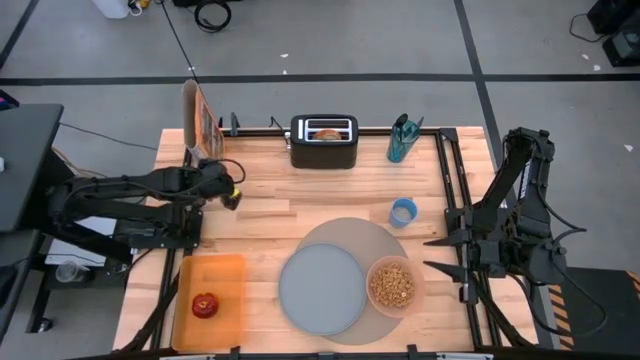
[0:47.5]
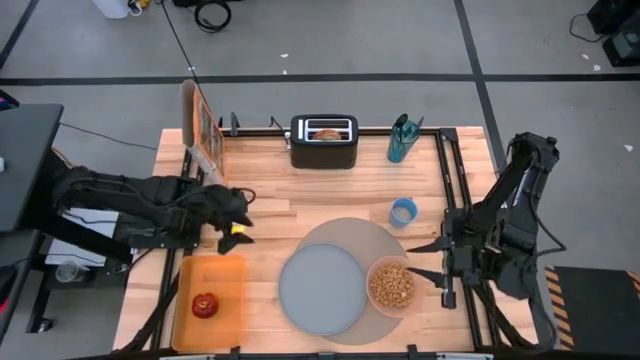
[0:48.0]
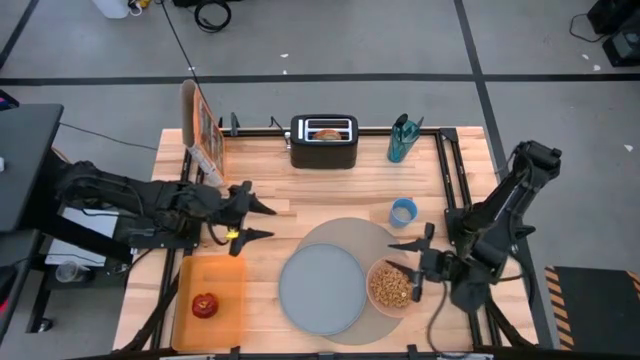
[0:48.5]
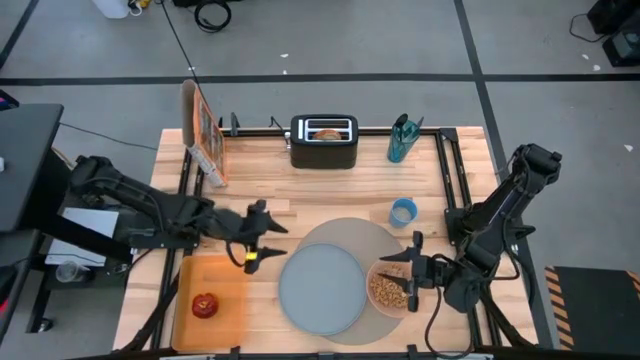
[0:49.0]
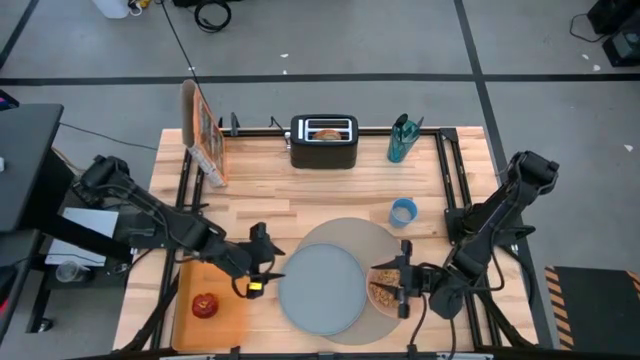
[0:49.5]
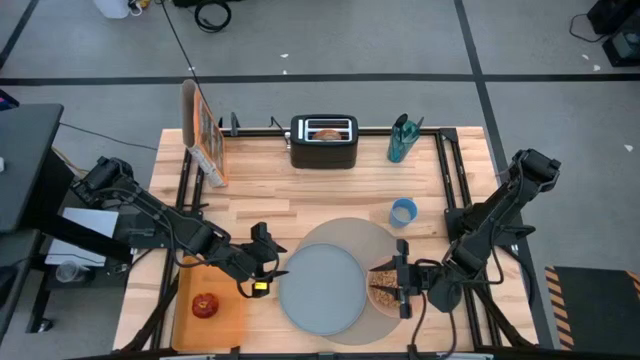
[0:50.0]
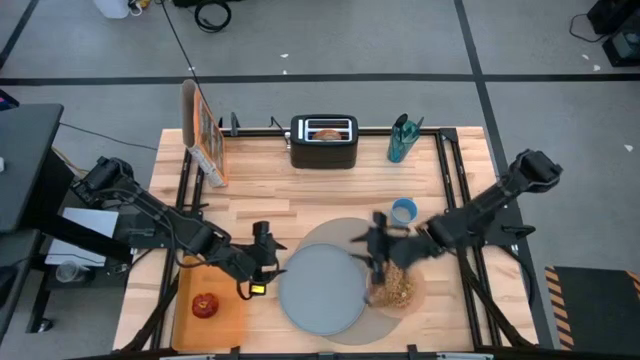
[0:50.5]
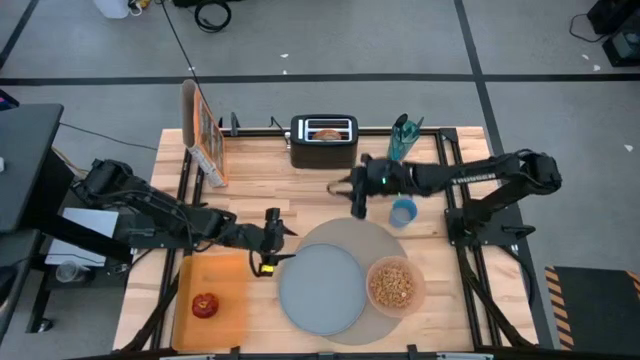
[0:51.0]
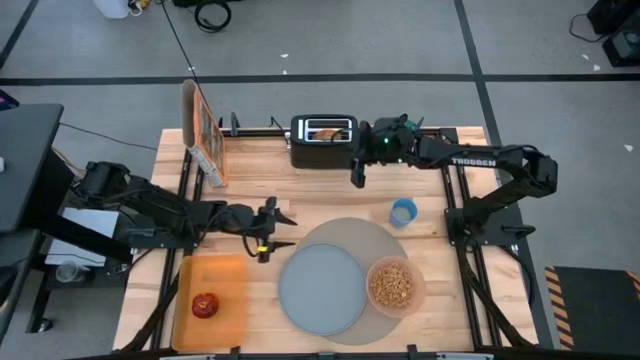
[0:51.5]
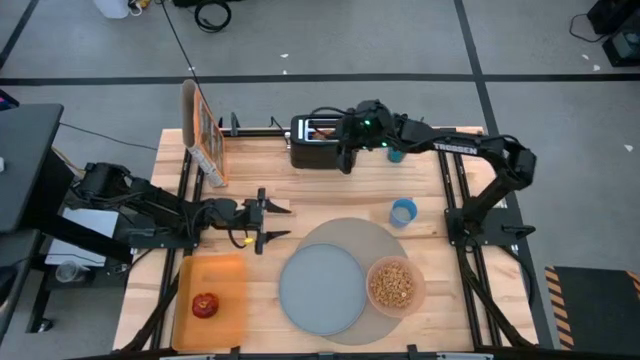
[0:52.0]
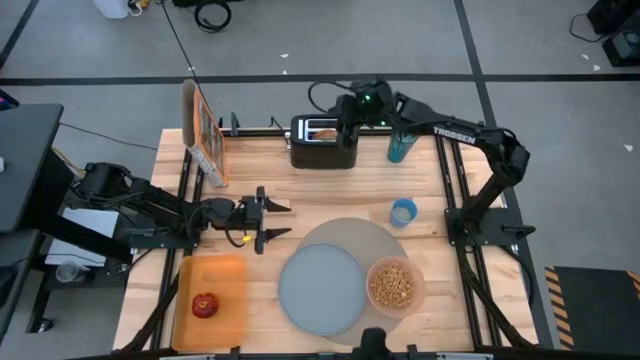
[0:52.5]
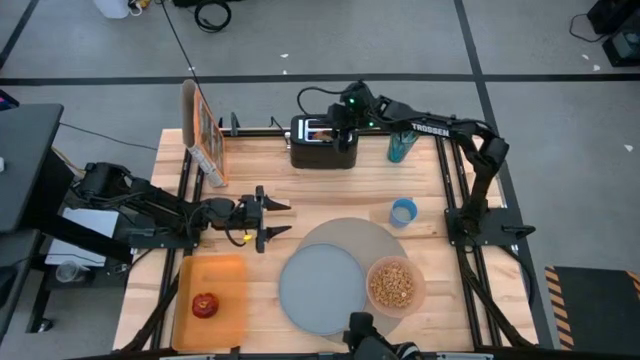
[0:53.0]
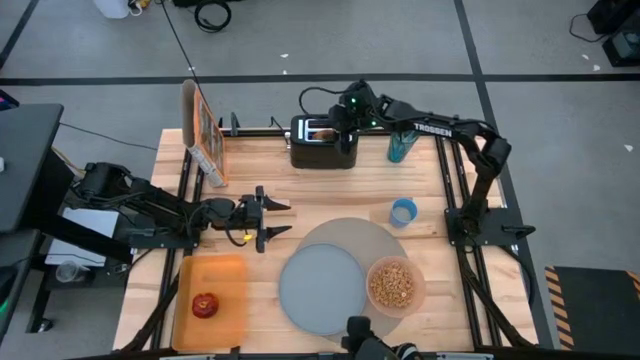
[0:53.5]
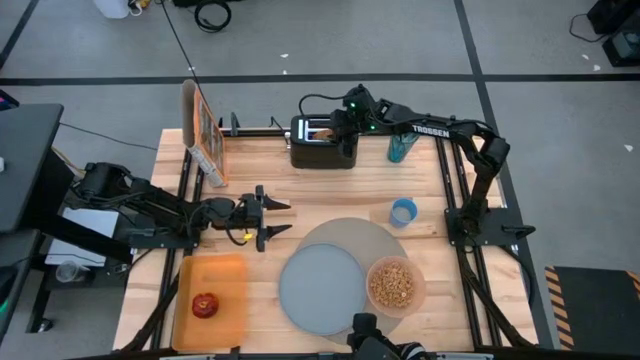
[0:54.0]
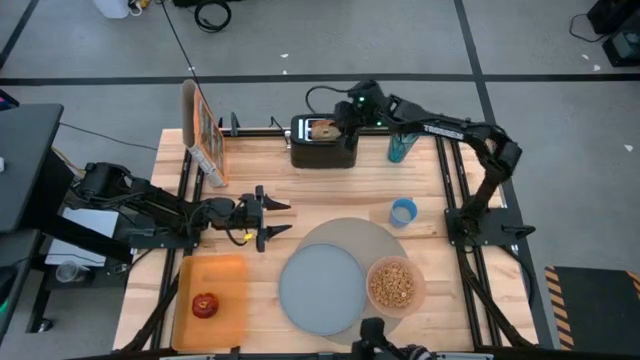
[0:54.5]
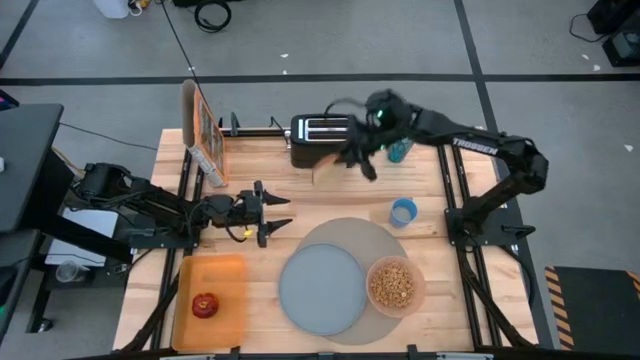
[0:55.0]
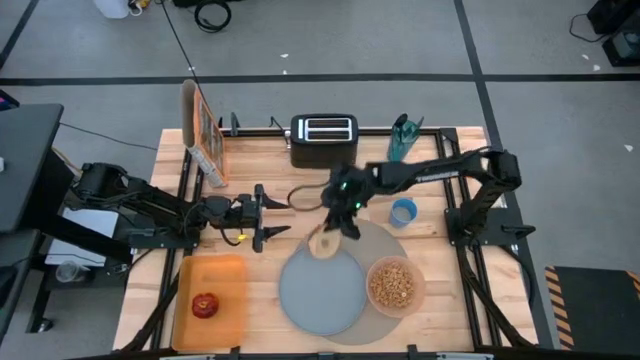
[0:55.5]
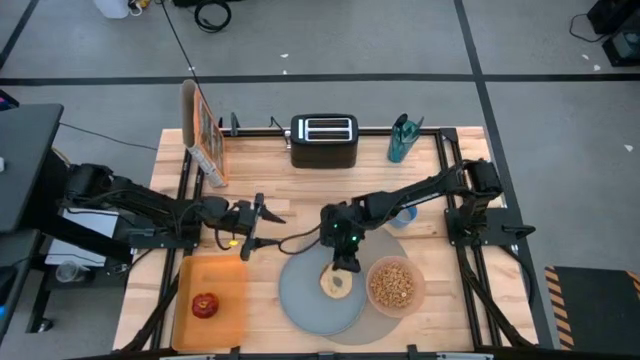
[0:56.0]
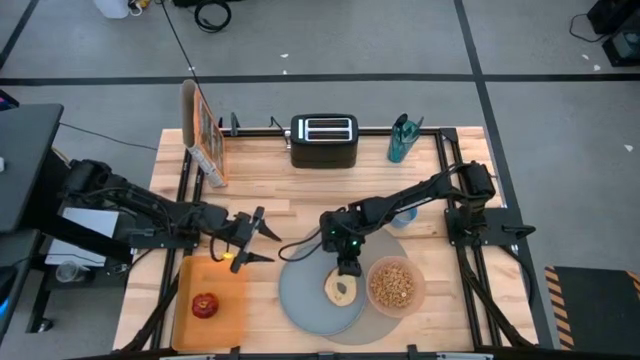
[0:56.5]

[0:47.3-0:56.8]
Task: Arrange a breakfast setting
Put the bagel on the blue plate

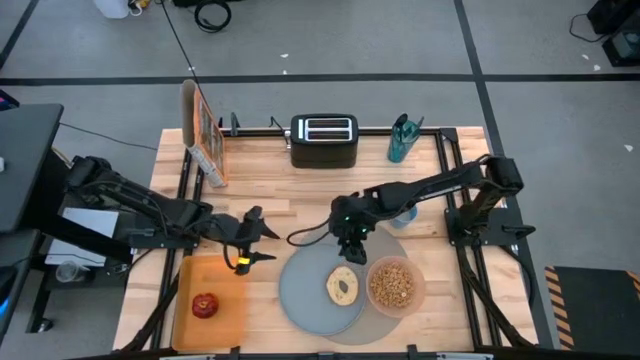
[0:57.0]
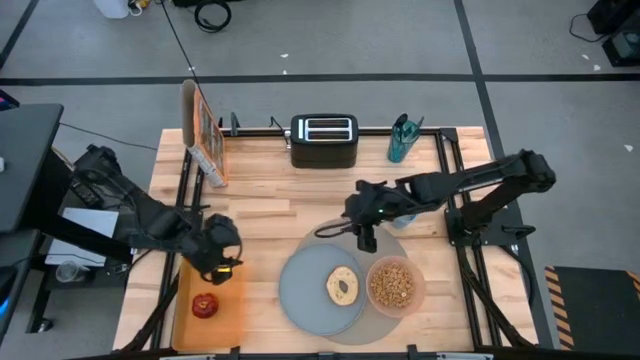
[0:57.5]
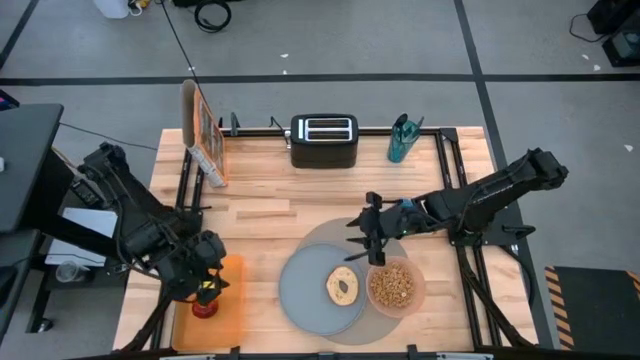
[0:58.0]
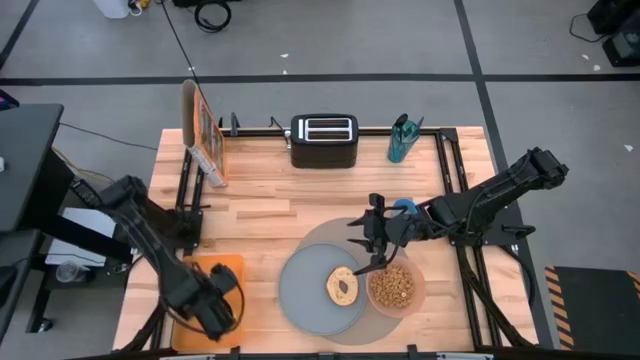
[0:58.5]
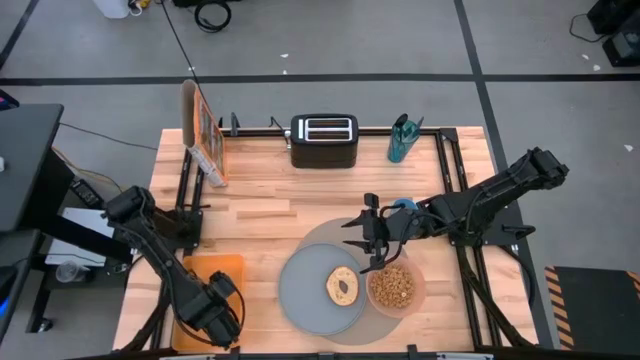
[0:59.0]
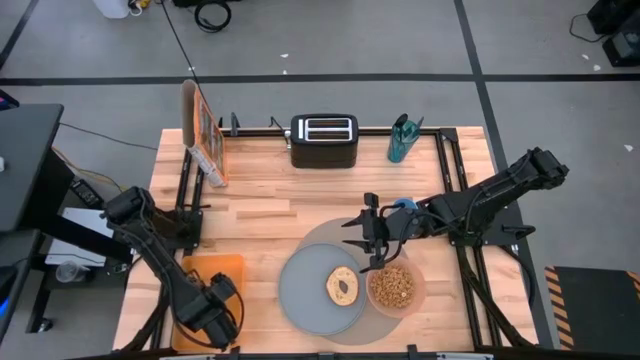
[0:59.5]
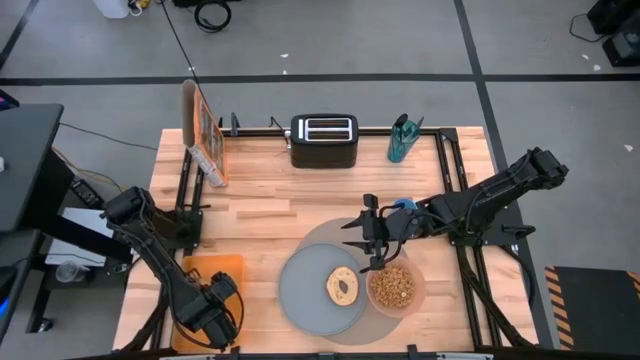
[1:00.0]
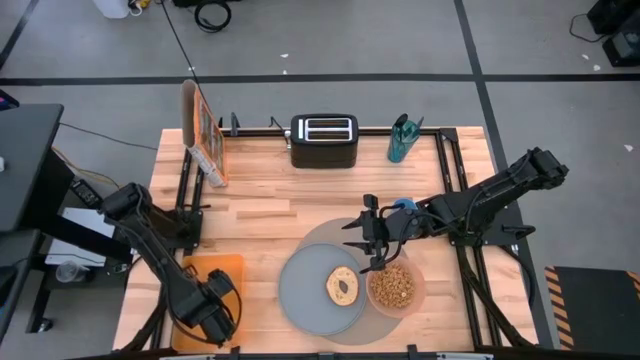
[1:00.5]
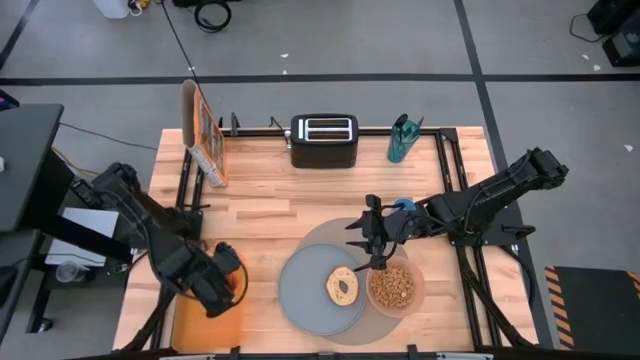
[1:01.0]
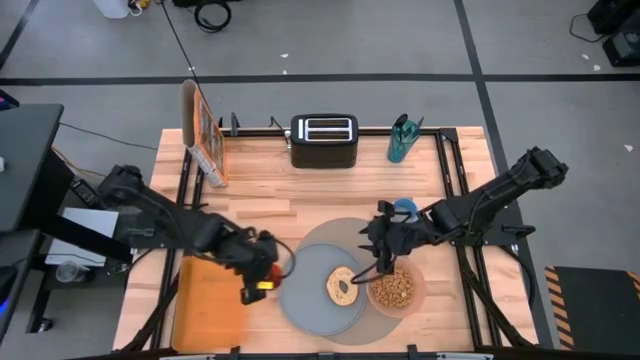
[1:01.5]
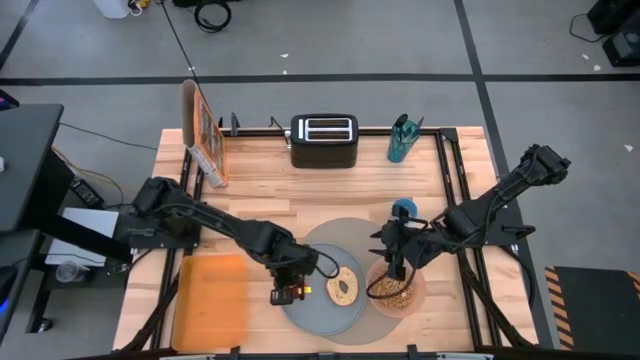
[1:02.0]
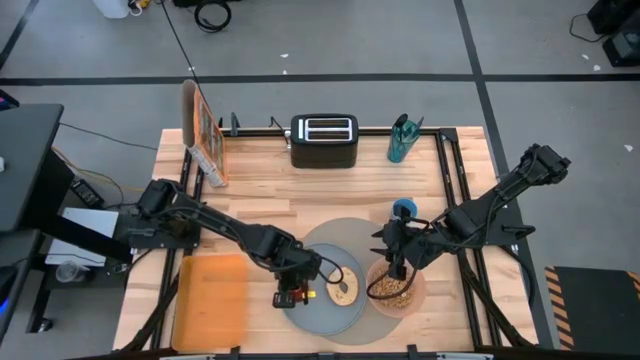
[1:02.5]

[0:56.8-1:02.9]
Put the apple on the blue plate

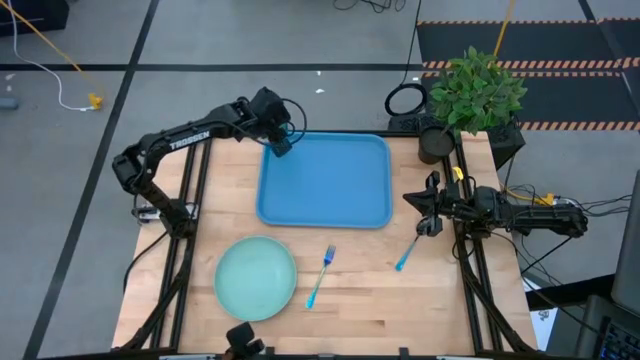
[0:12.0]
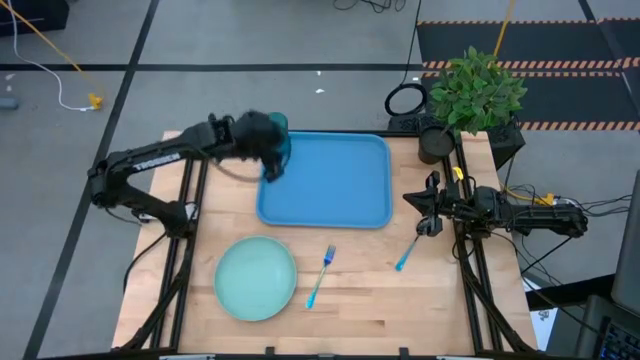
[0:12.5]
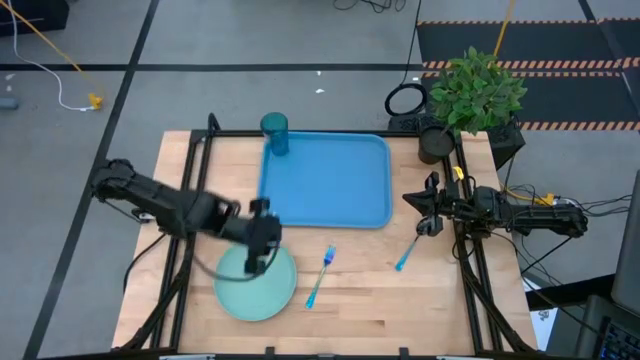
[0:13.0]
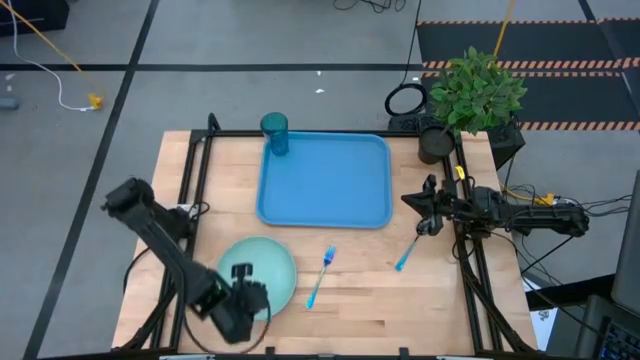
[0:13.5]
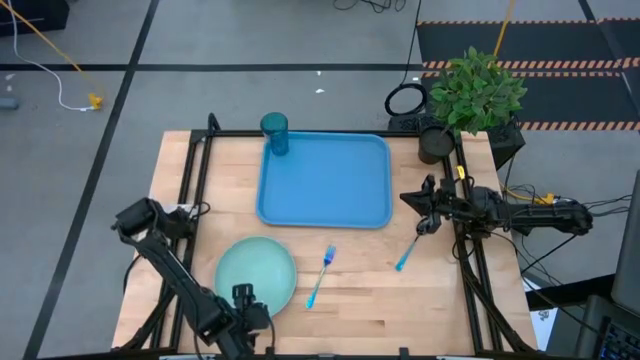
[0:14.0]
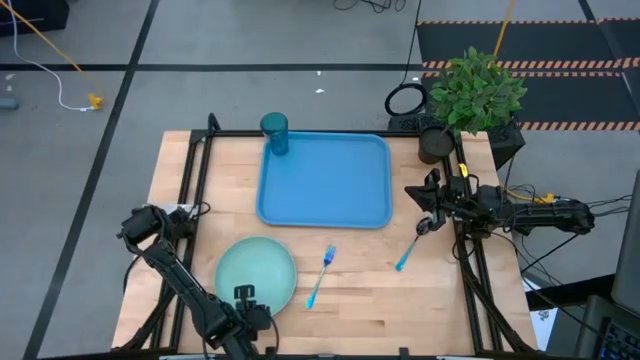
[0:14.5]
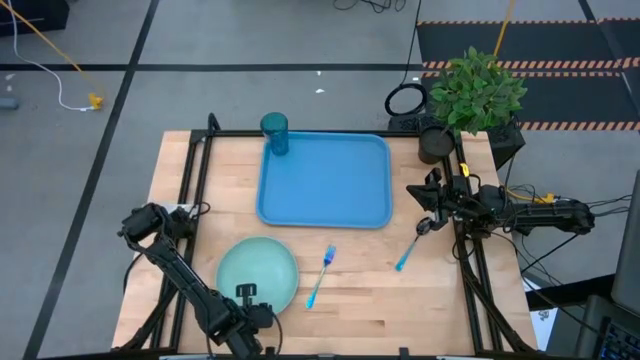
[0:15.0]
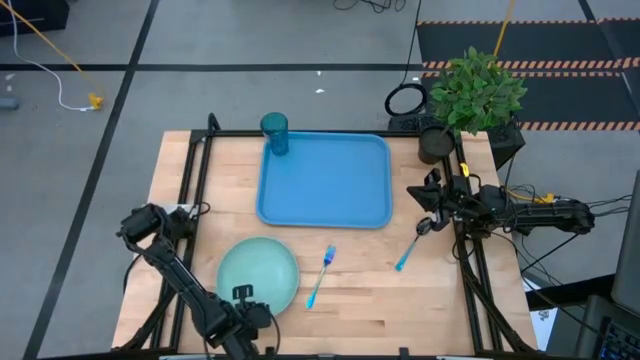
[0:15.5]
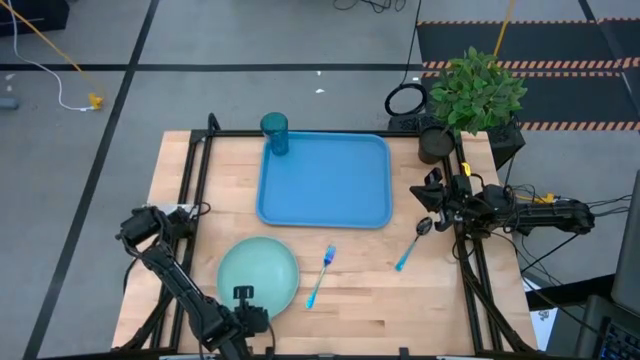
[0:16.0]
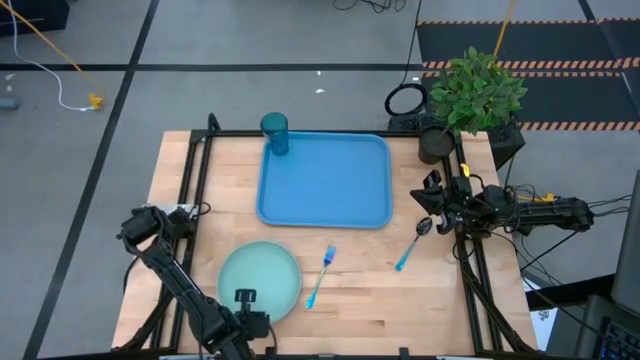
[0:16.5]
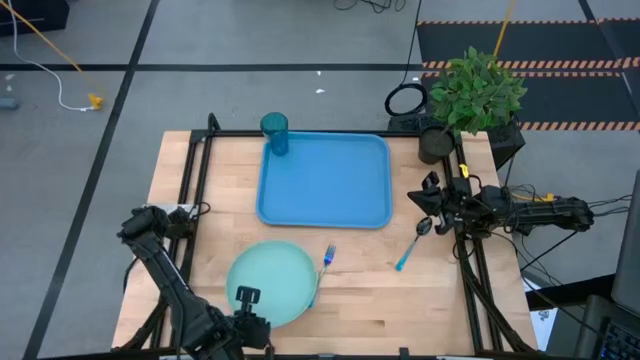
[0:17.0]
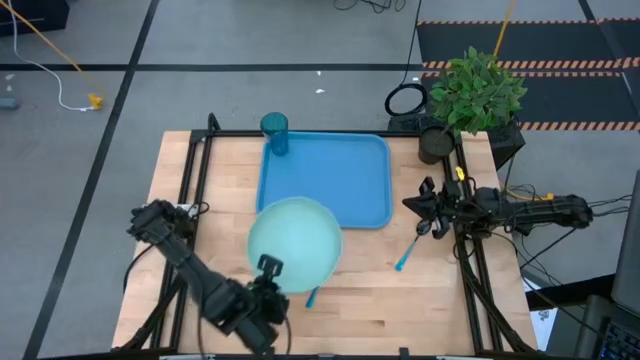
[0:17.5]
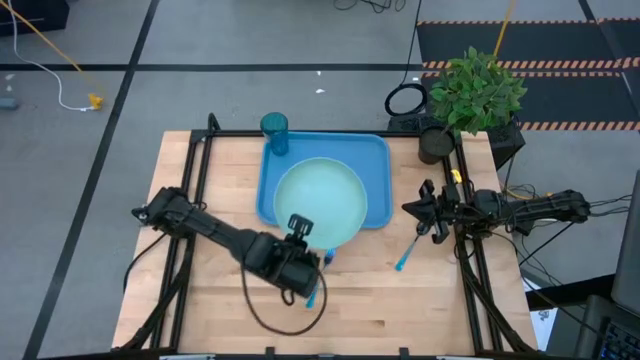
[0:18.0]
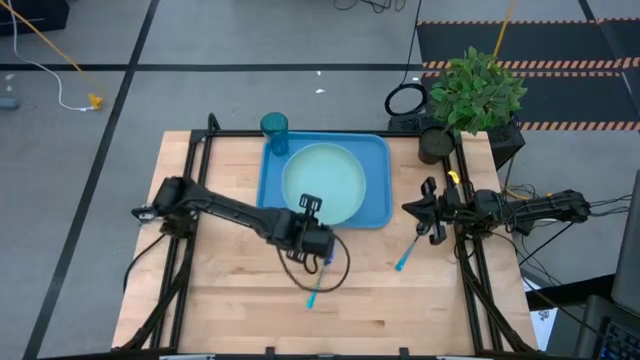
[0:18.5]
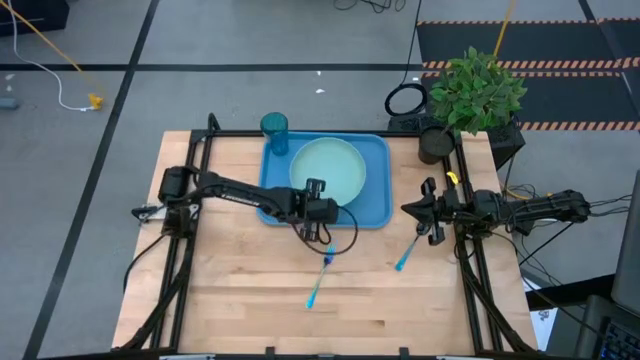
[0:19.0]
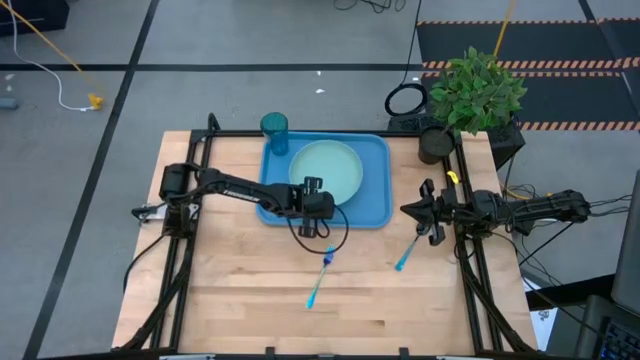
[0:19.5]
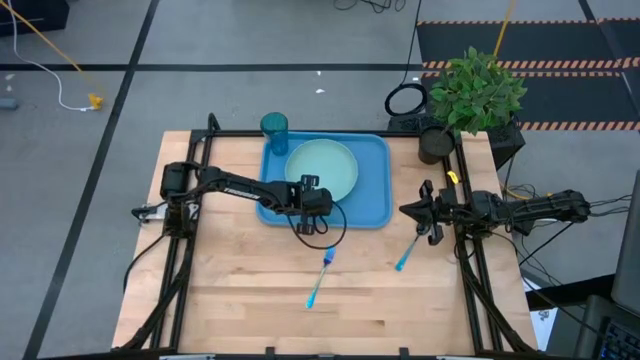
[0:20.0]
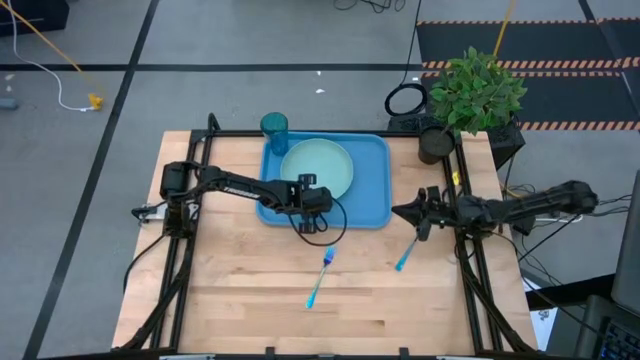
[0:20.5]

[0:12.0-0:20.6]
Task: Pick and place plate/cup/fork/spoon on tray
Put the plate on the center of the cup on the blue tray
